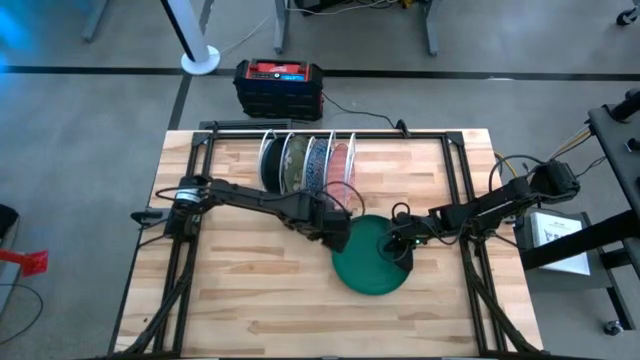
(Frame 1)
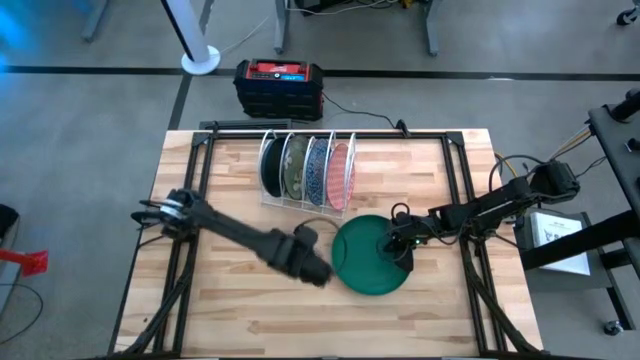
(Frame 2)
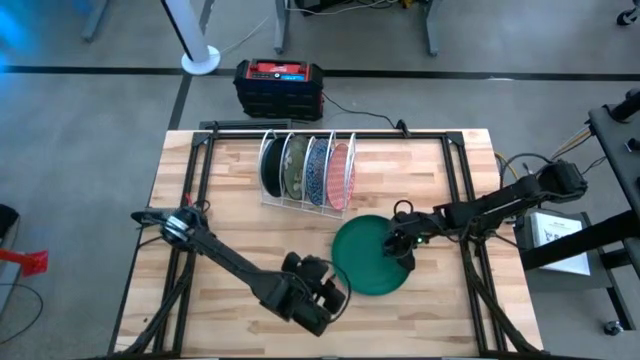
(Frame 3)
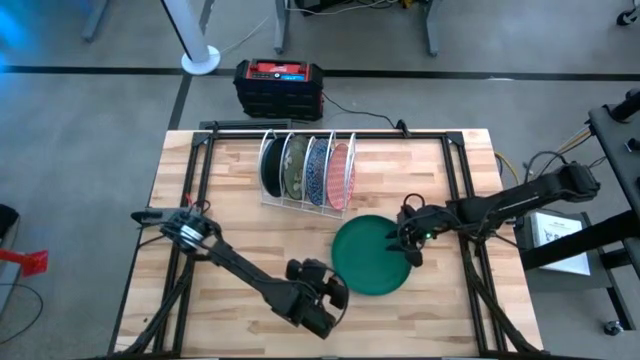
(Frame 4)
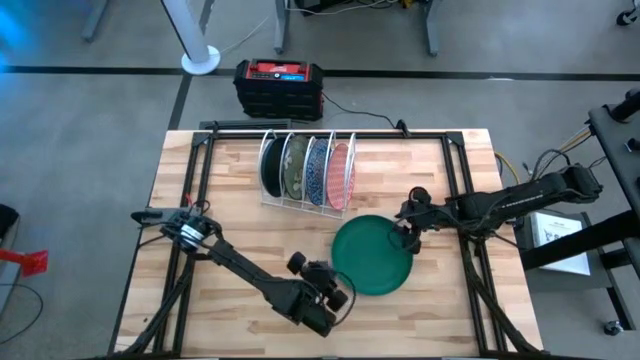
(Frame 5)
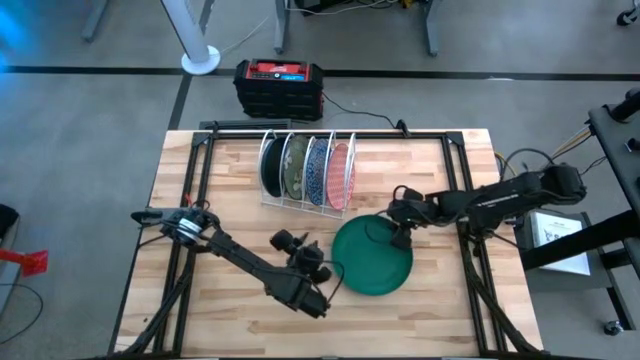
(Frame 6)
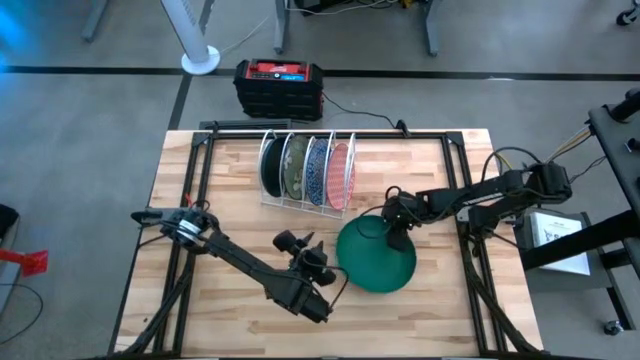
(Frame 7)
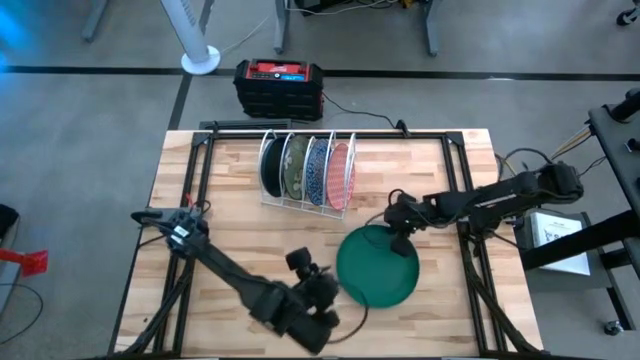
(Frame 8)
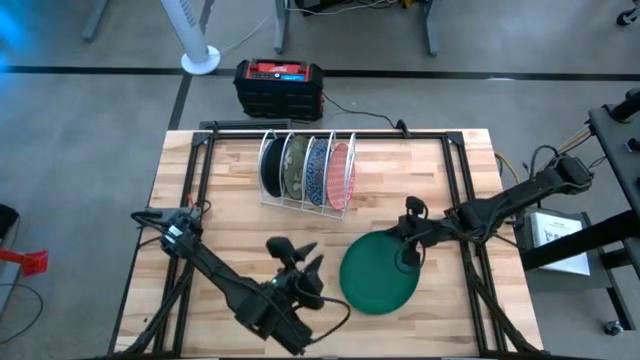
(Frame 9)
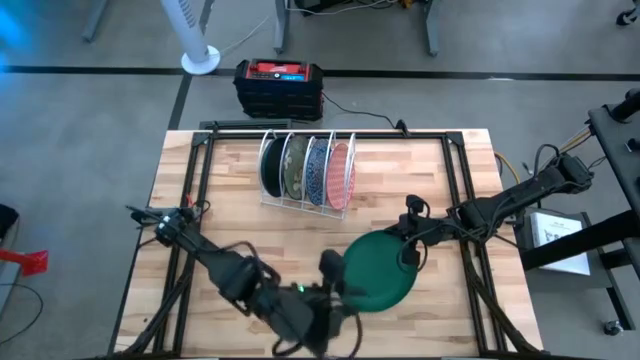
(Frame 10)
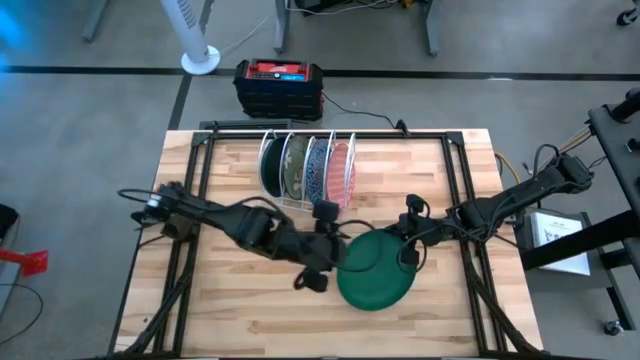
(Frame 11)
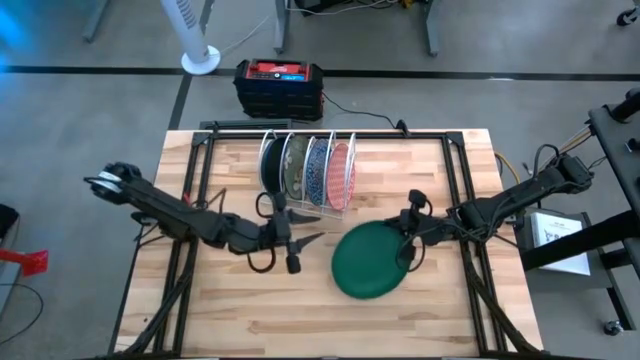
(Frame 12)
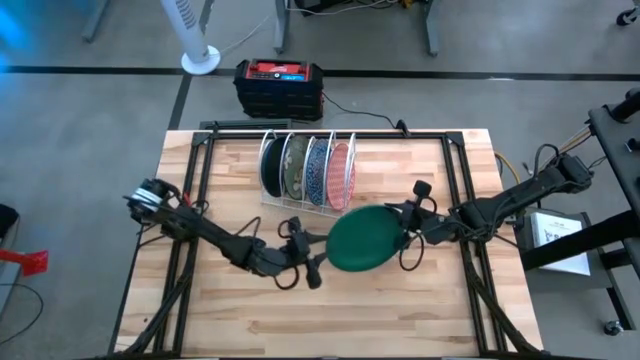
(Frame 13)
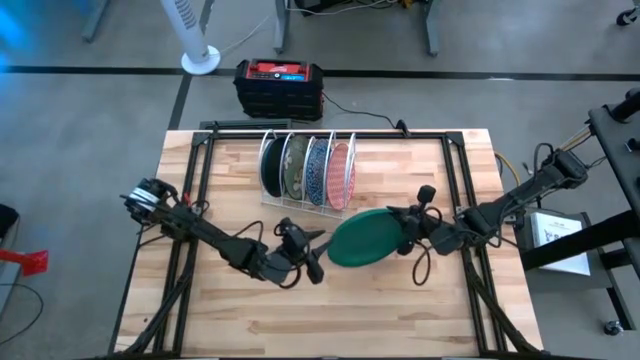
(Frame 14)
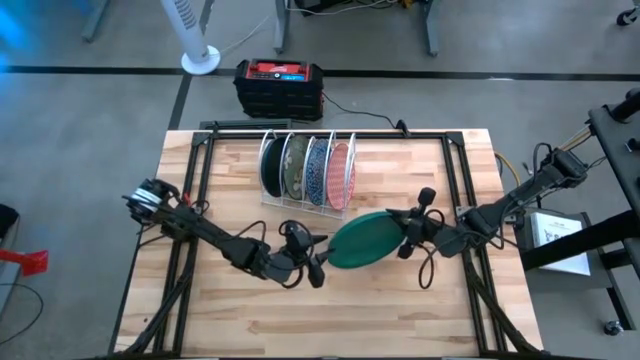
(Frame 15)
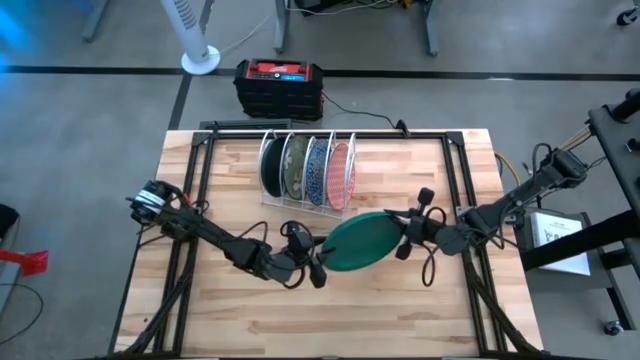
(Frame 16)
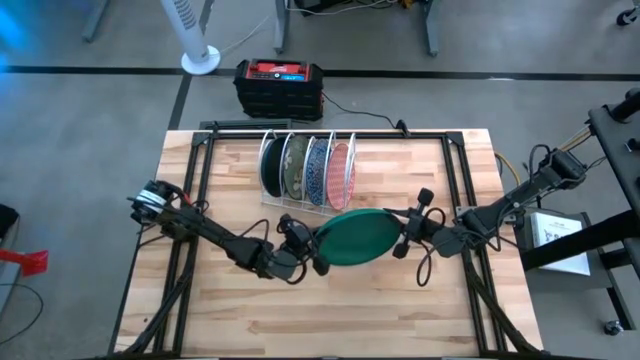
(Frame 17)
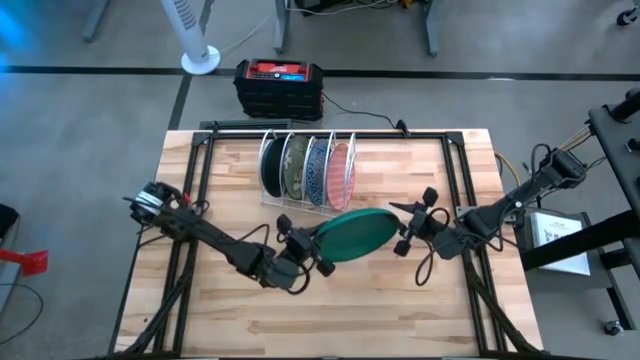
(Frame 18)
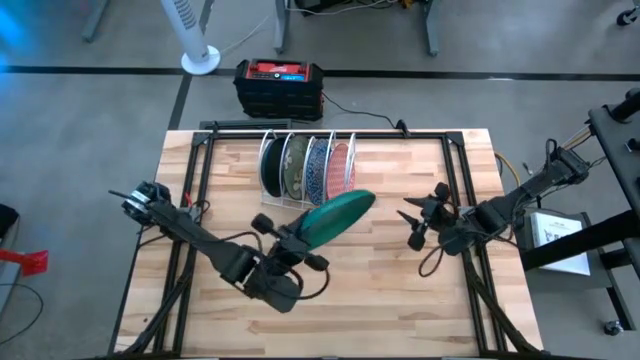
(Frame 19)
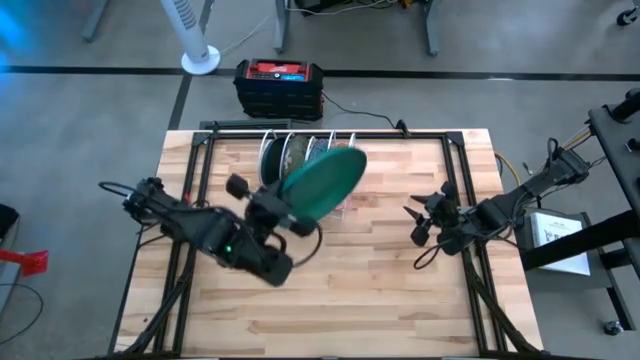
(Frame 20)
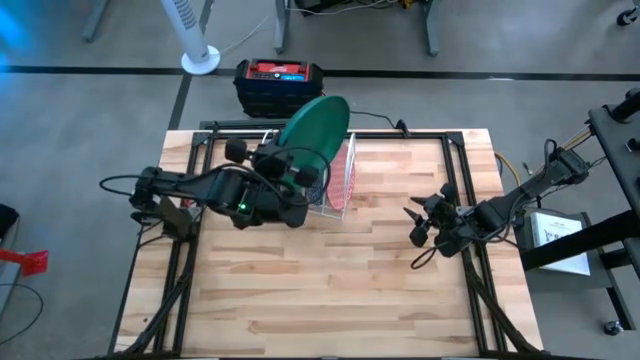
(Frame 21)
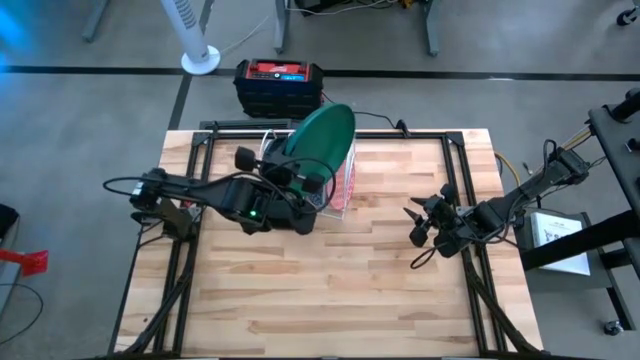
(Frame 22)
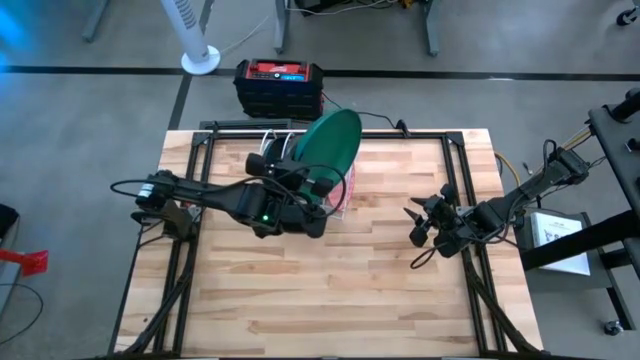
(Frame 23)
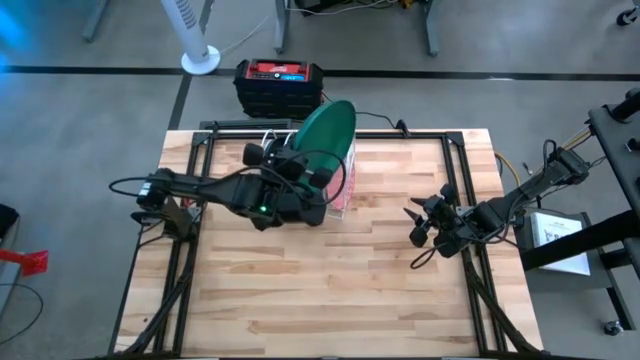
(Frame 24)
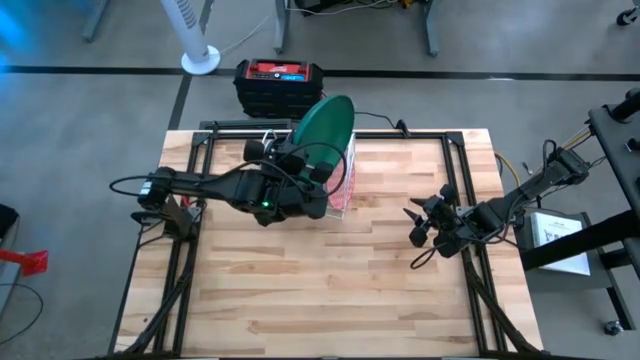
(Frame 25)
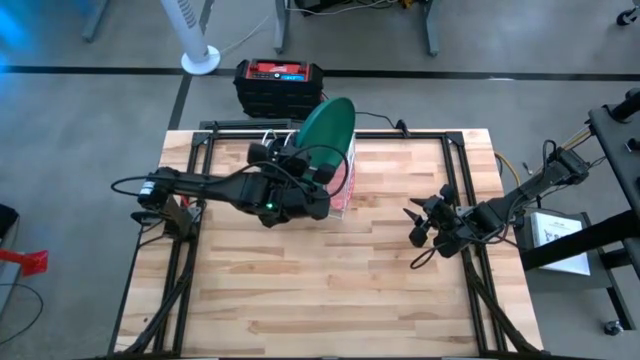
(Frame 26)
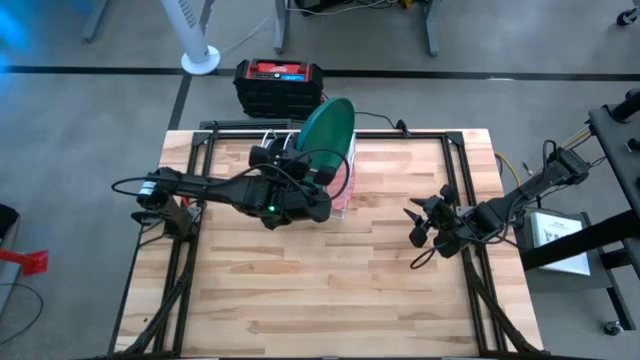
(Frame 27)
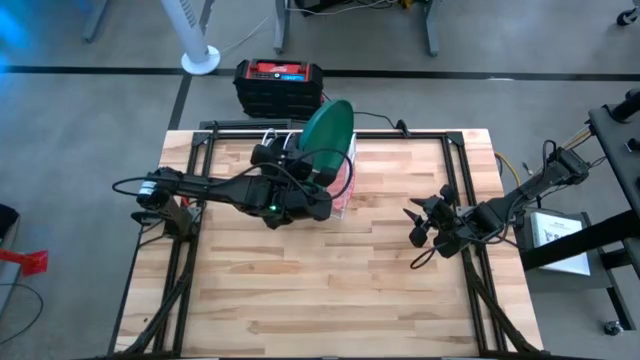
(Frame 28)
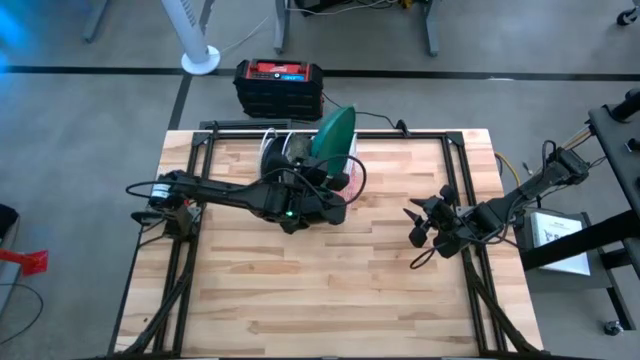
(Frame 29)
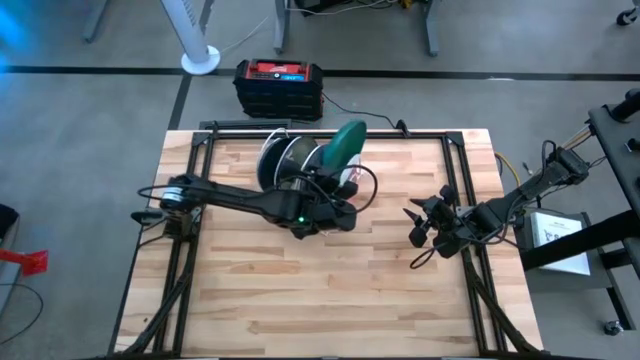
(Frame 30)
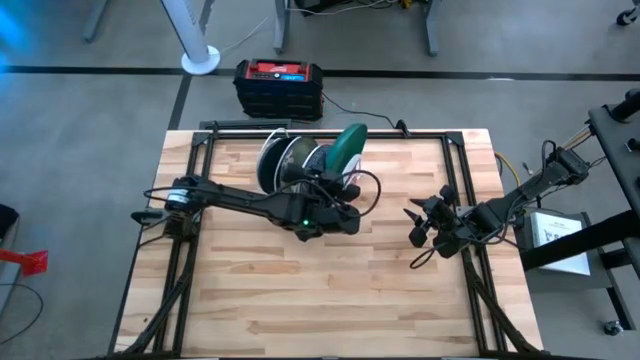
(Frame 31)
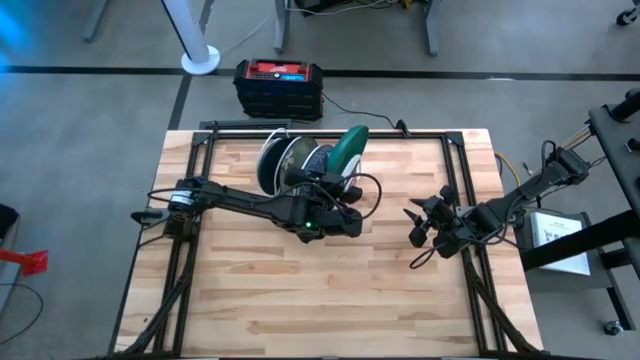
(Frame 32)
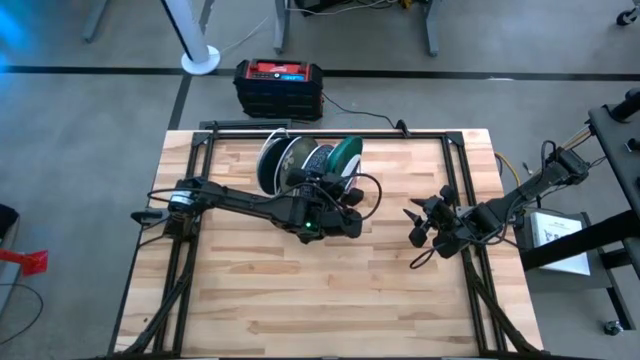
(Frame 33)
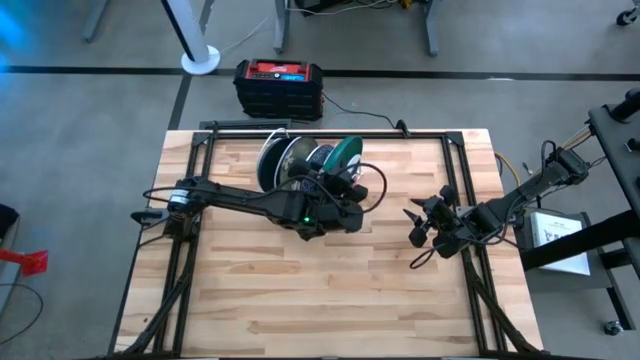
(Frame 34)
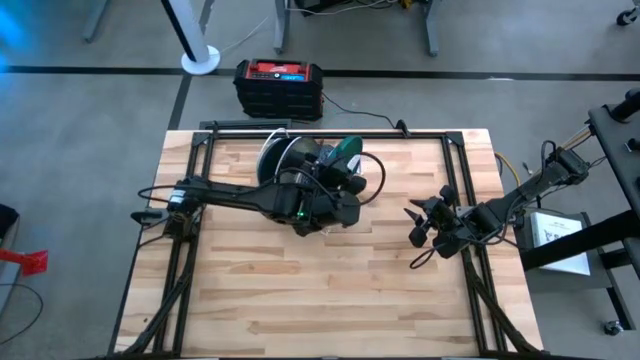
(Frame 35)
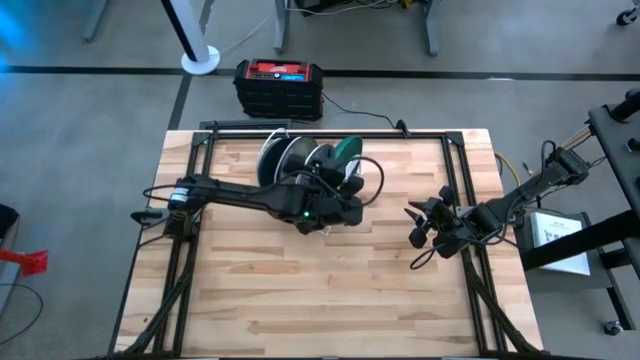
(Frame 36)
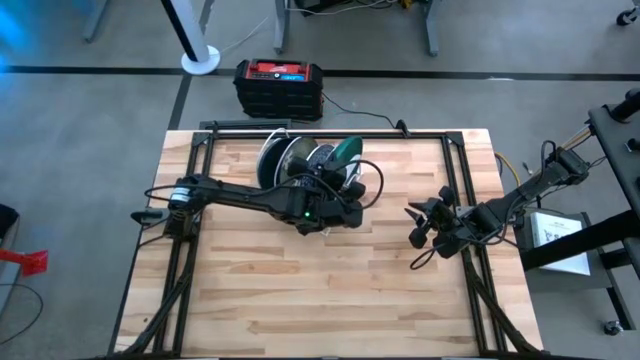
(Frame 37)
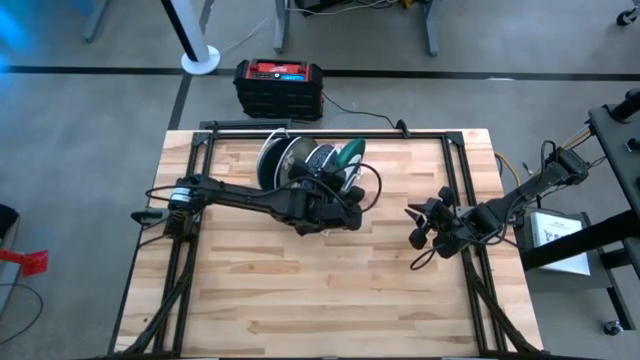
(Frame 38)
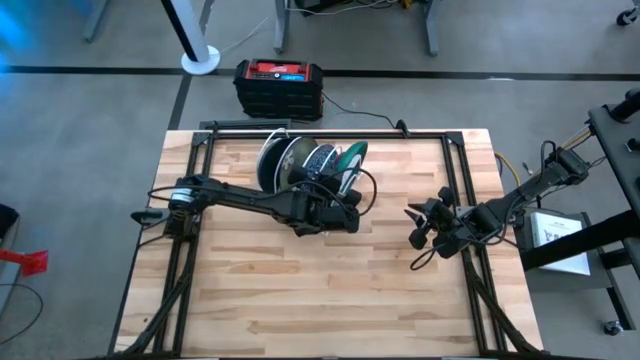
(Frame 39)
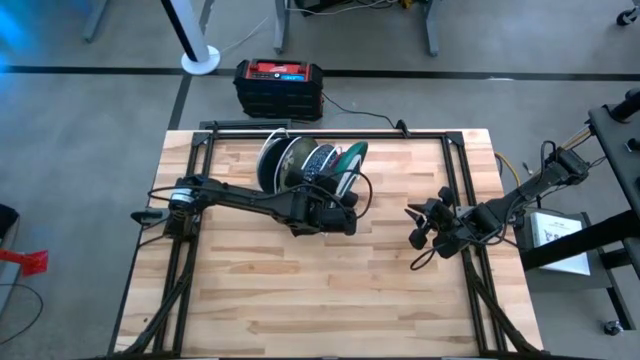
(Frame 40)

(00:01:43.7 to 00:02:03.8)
Task: Sort dishes
Put the green plate into the white dish rack

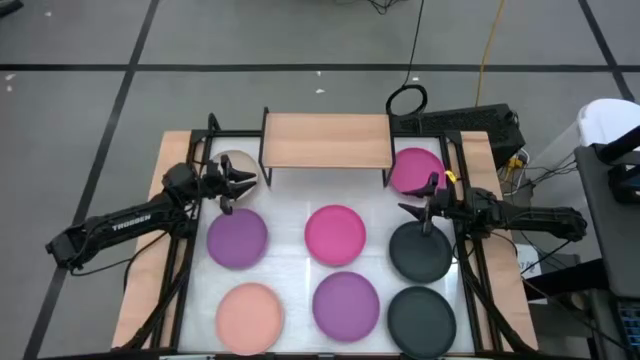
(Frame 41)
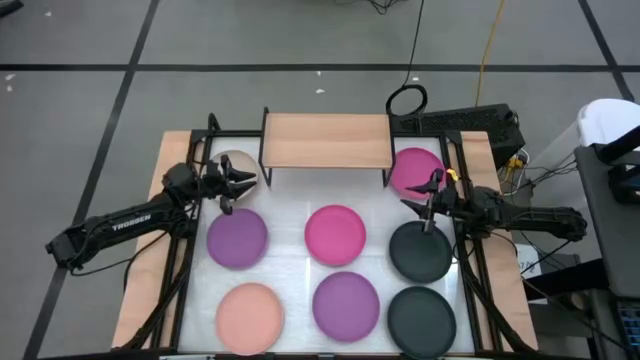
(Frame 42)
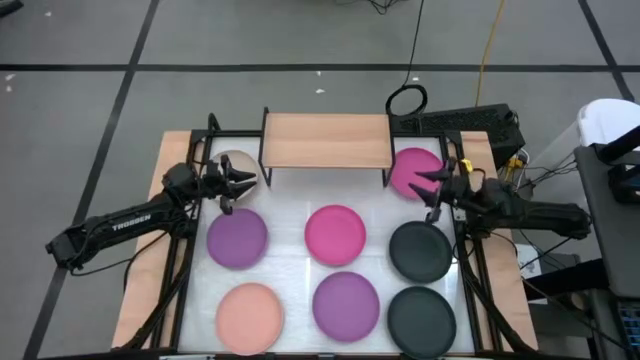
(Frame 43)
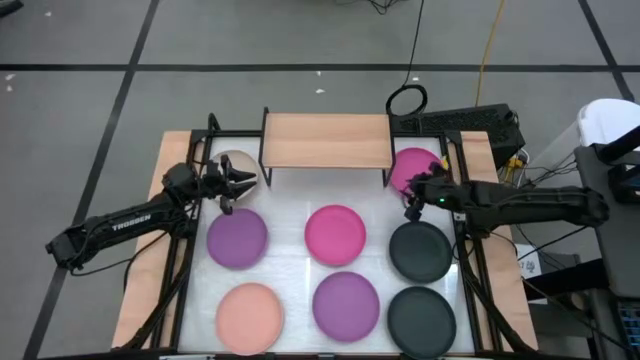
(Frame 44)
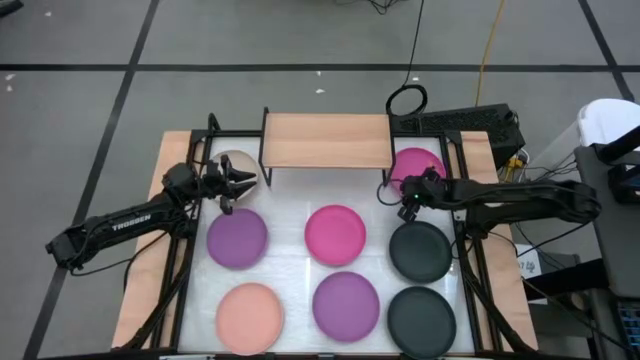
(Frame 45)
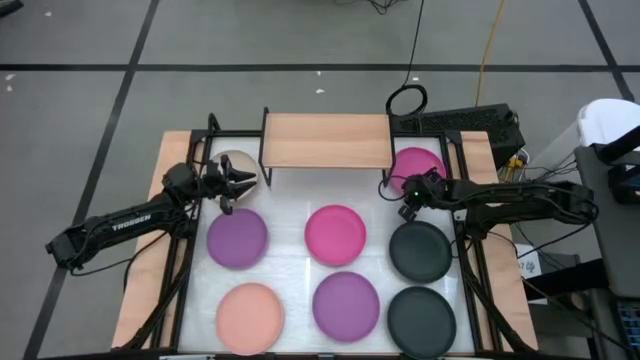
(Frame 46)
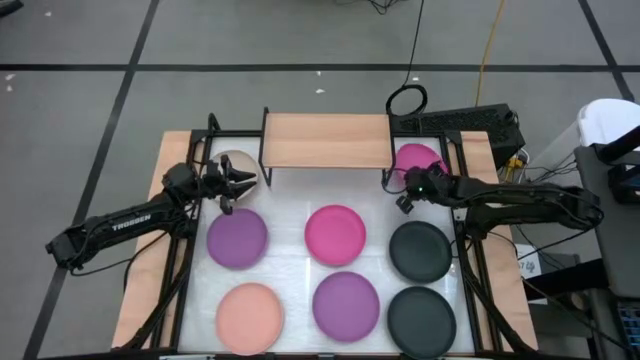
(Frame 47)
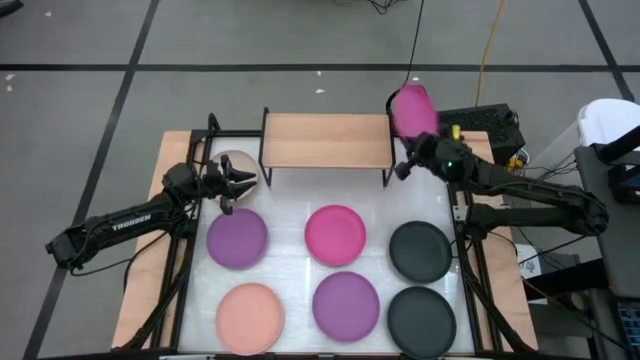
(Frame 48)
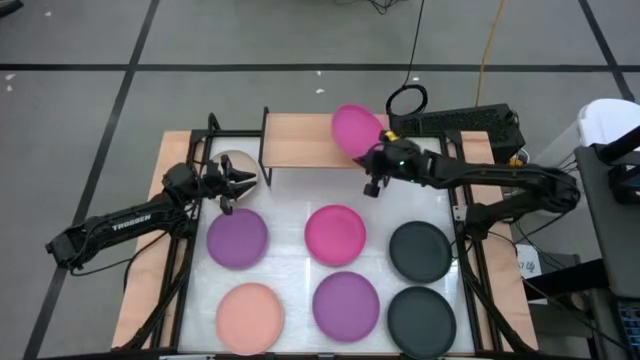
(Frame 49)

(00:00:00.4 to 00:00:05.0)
Task: Place and stack plates onto a shelf
Put the top pink plate on the shelf
